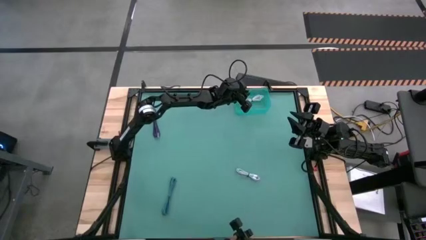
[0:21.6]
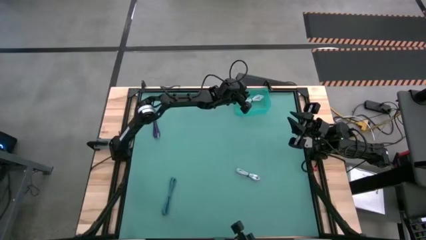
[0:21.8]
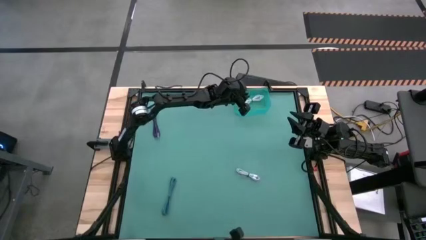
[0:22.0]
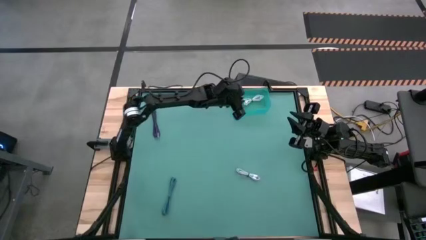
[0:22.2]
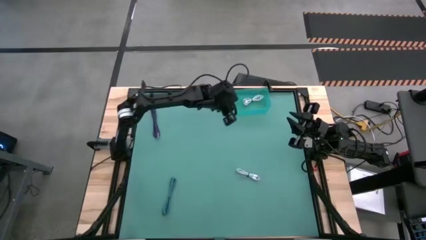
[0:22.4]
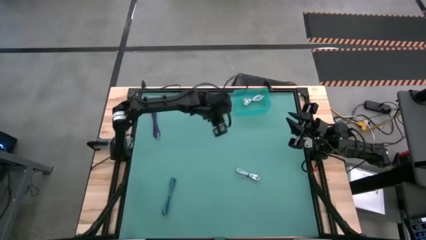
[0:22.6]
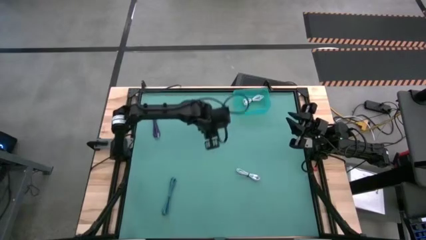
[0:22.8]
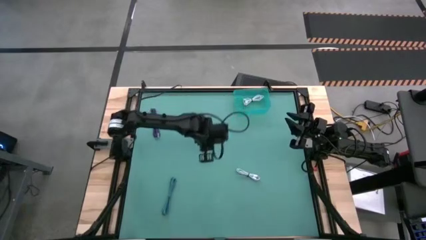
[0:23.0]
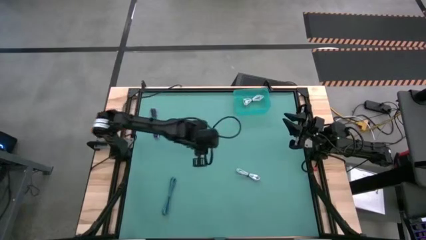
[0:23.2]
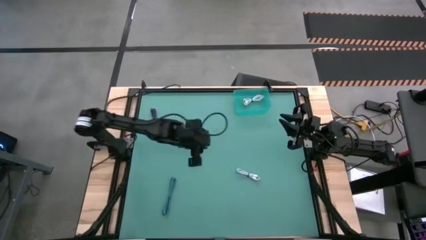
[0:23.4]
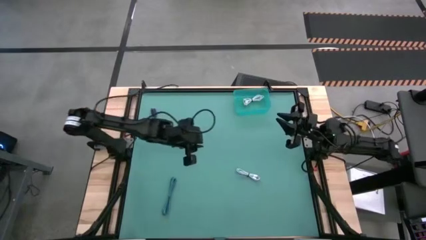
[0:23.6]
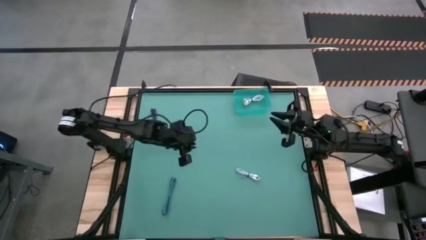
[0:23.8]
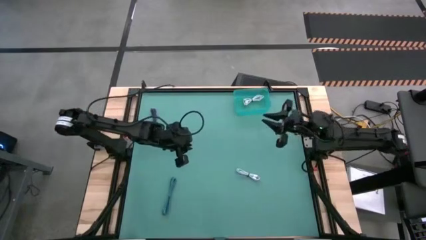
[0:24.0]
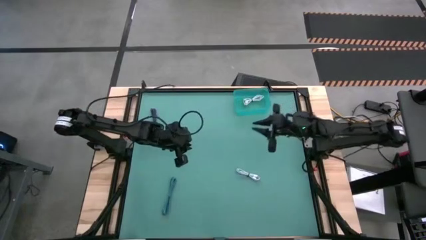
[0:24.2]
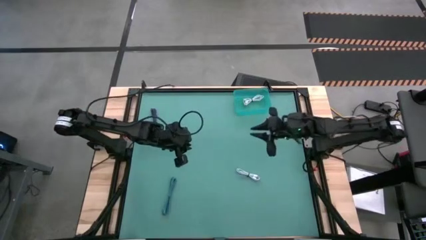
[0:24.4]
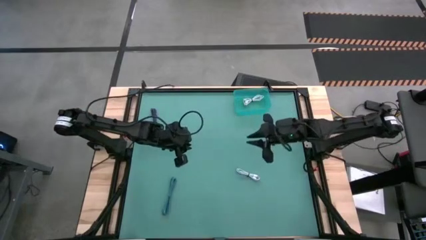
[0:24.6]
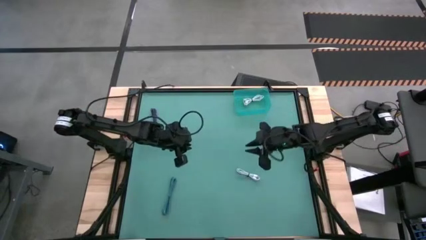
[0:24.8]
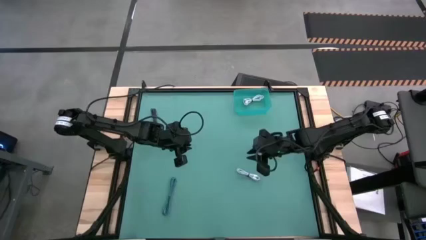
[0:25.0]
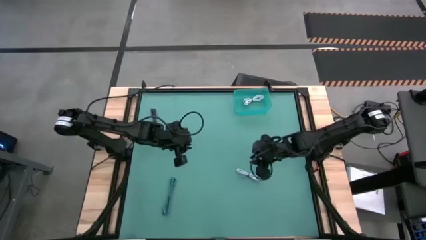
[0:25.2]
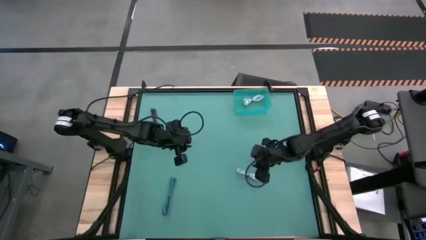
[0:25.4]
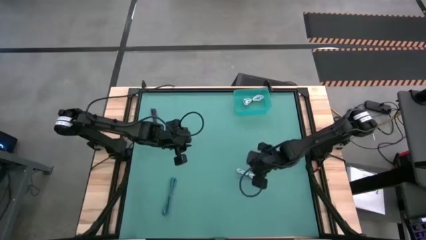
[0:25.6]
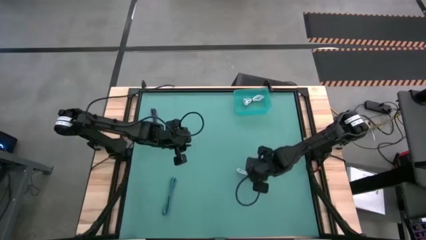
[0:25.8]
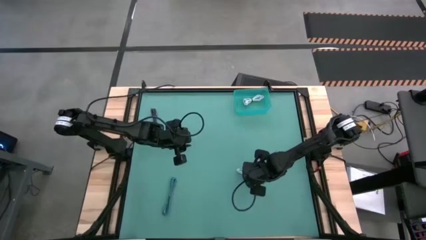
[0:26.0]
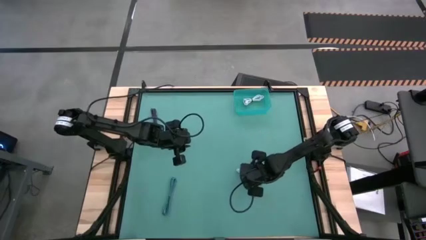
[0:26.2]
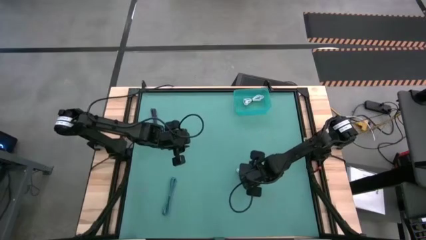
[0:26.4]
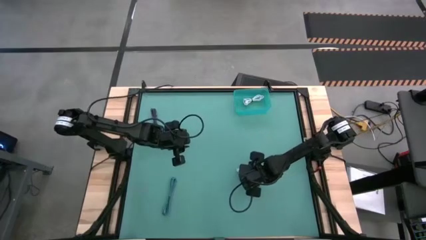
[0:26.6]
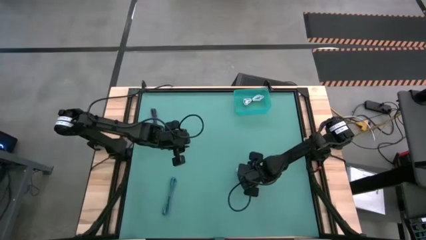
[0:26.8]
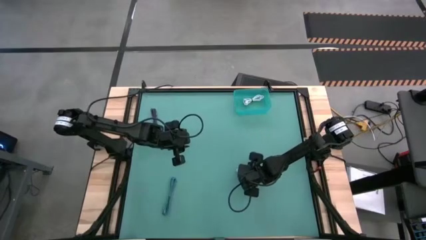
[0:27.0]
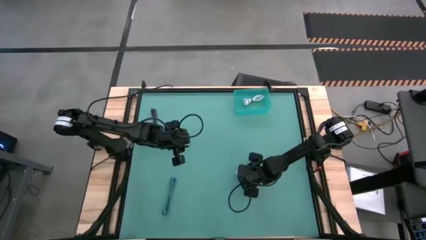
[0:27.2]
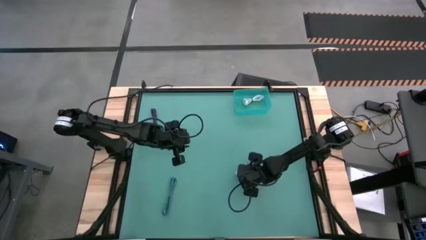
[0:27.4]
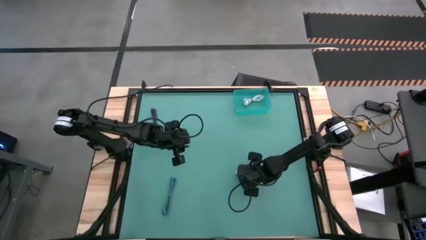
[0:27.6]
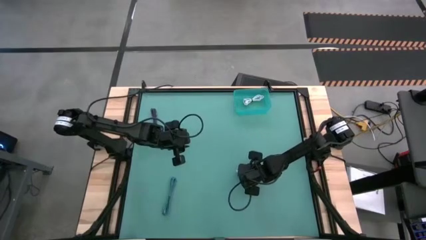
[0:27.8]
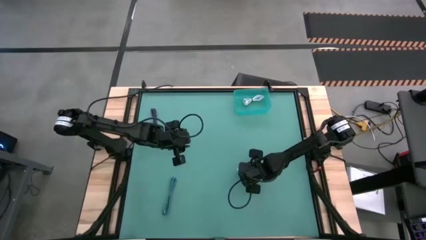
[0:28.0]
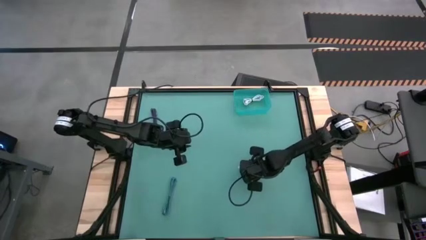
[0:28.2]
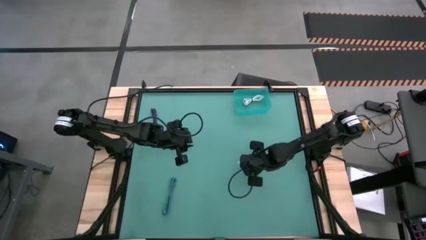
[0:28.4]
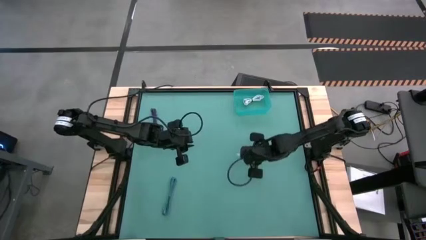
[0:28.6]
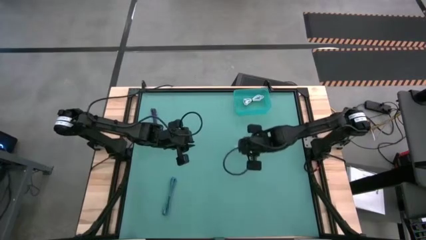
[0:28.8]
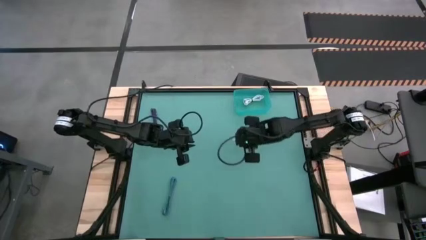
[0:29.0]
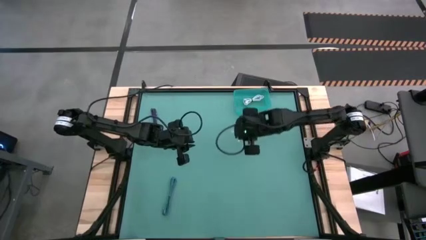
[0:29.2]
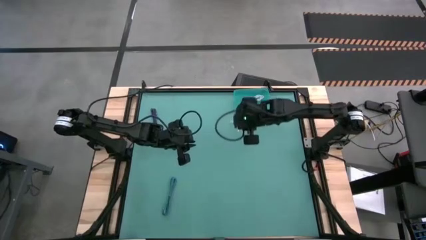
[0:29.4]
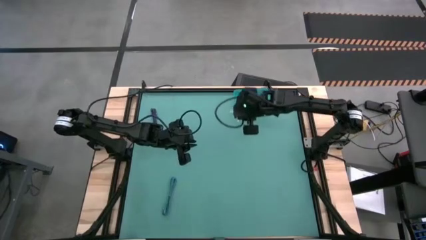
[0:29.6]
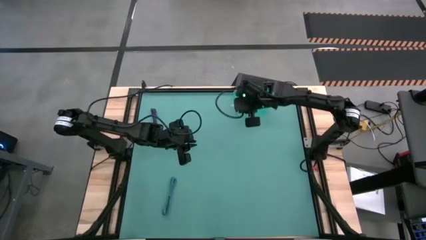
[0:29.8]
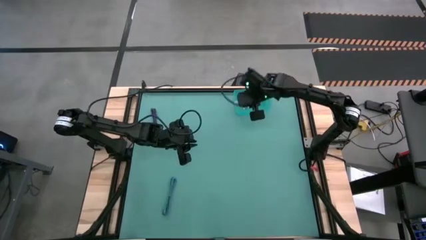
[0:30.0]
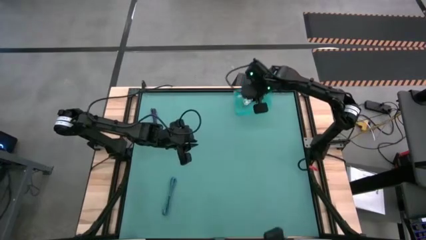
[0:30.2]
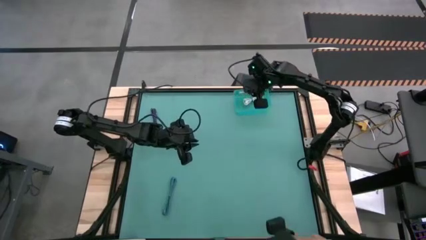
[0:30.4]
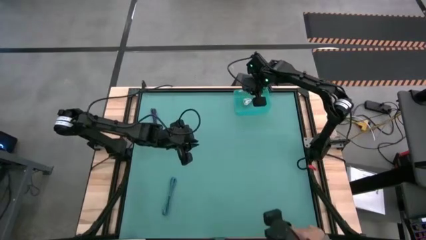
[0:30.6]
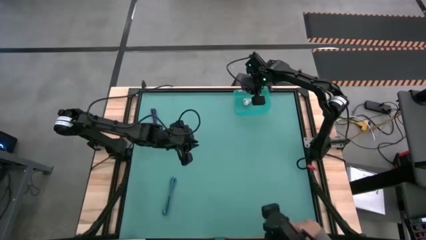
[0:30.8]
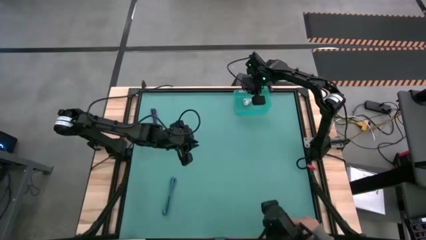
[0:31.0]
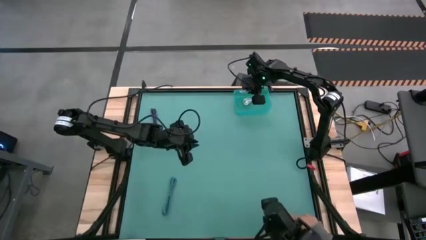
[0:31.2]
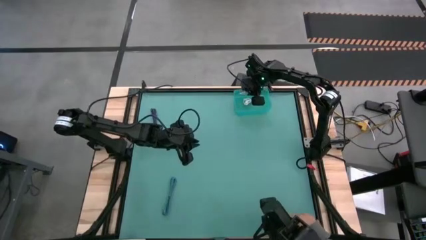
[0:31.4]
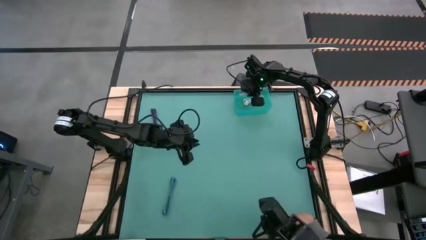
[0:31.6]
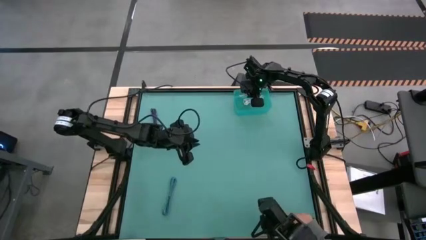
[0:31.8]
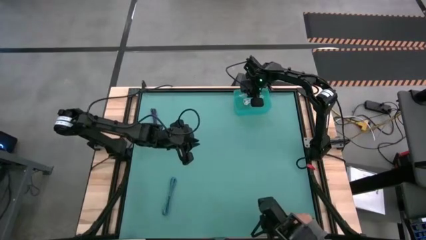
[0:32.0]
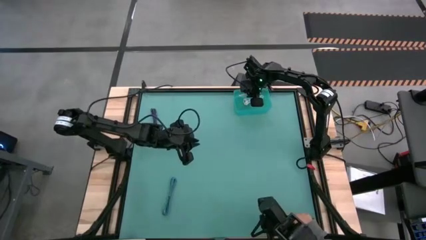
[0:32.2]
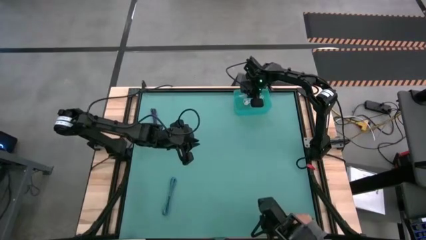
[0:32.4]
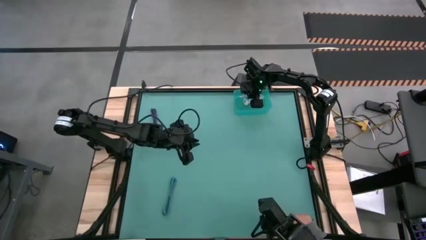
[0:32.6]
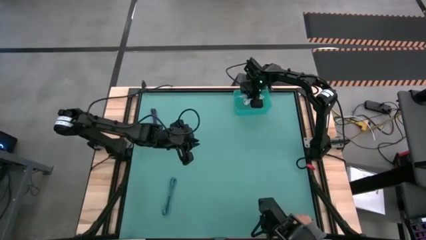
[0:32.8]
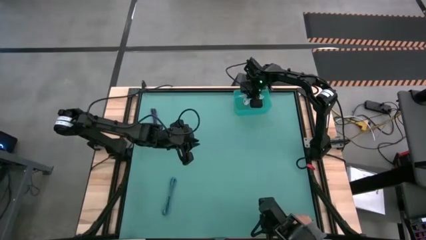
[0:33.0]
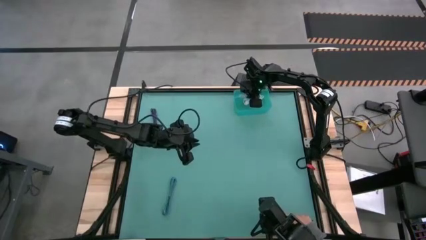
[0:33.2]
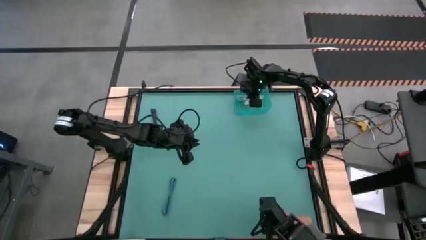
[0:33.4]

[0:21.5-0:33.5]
Task: Pick and place USB-C Cables
Put the white charger cable into the blue bin
